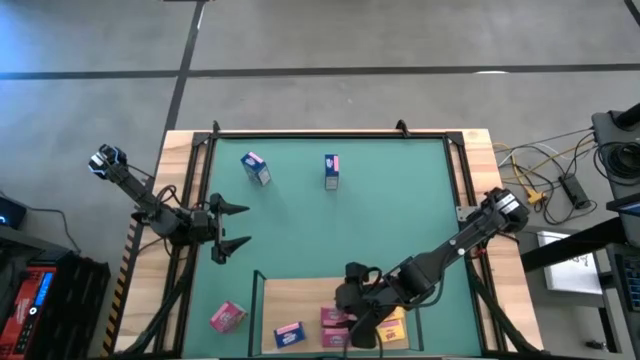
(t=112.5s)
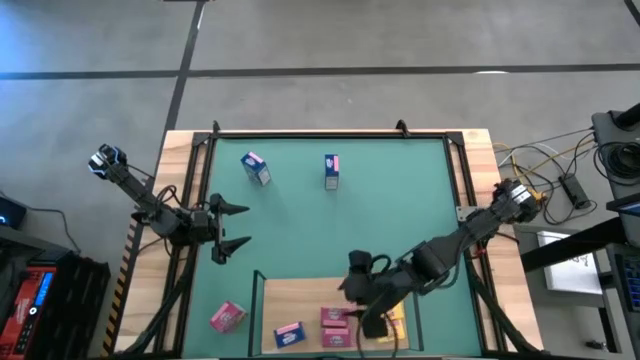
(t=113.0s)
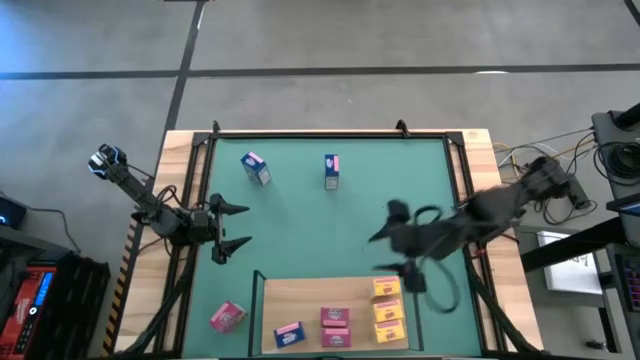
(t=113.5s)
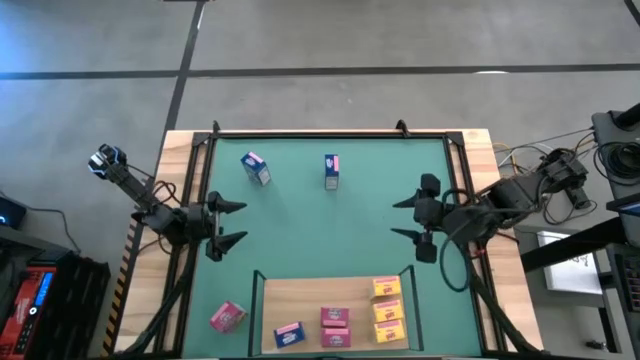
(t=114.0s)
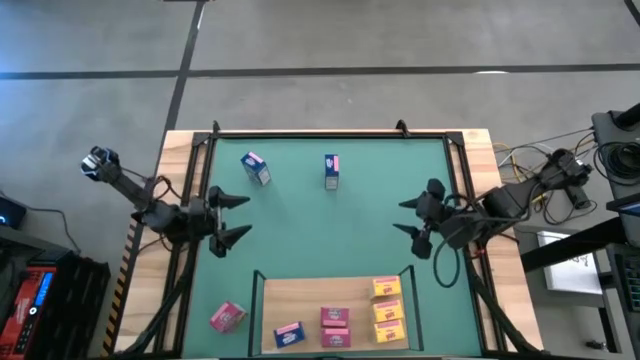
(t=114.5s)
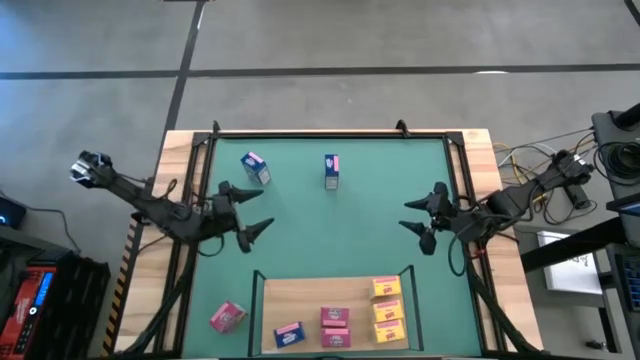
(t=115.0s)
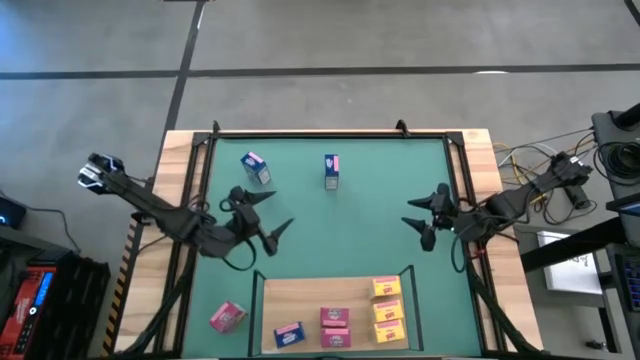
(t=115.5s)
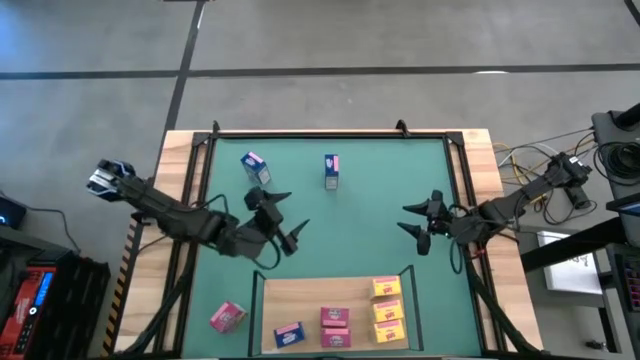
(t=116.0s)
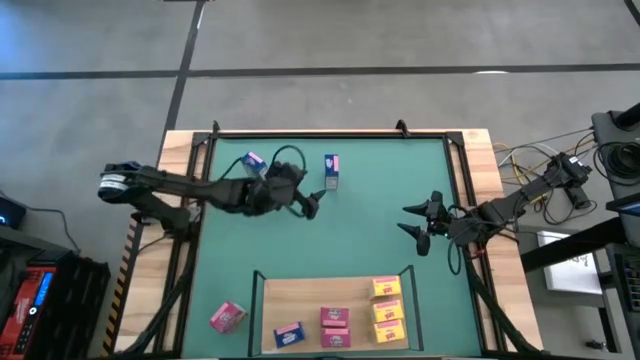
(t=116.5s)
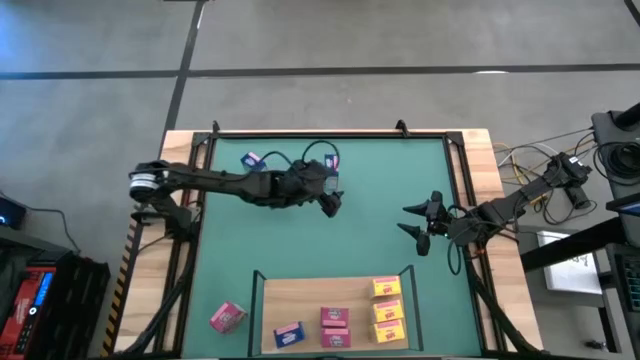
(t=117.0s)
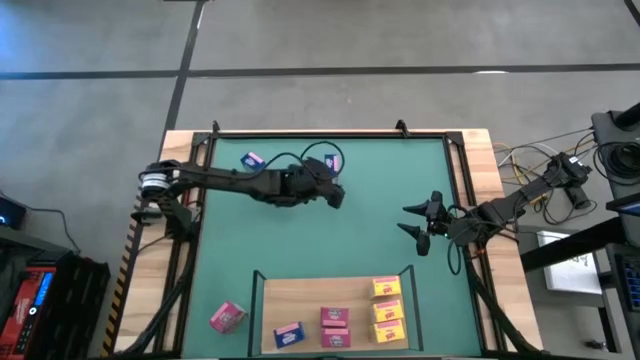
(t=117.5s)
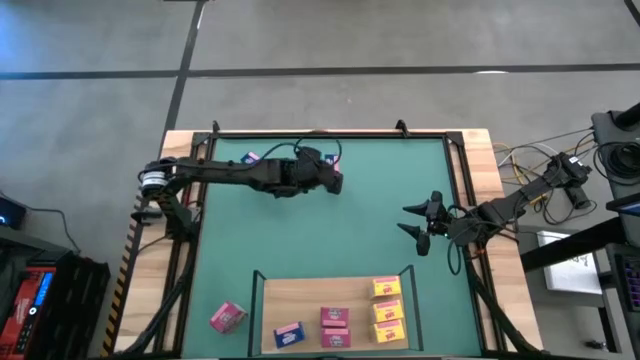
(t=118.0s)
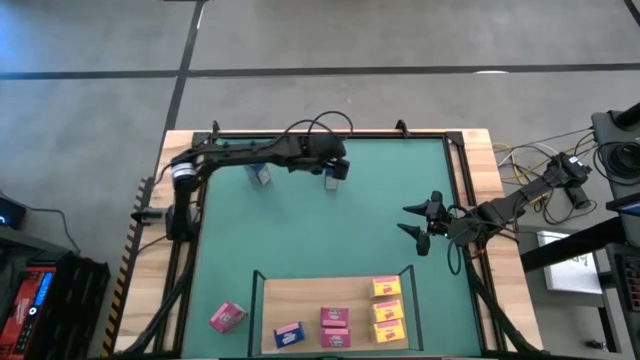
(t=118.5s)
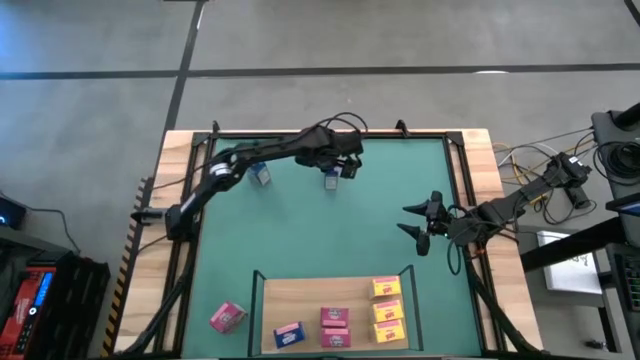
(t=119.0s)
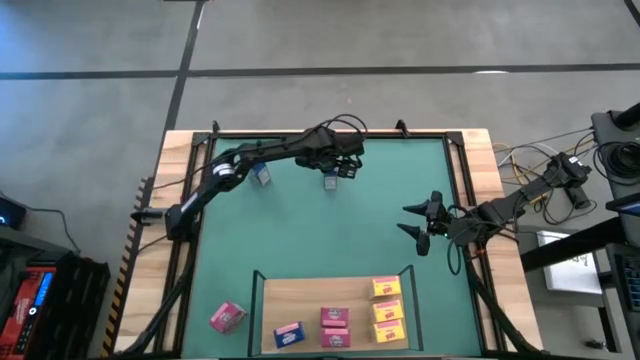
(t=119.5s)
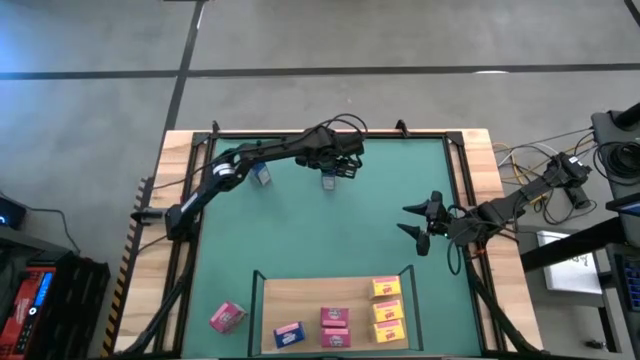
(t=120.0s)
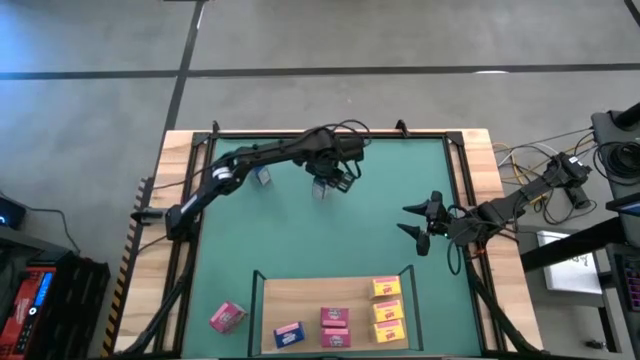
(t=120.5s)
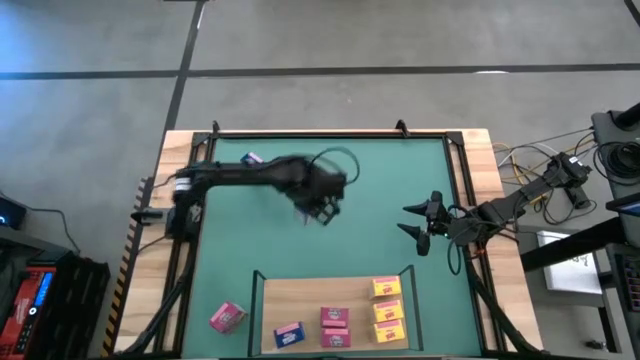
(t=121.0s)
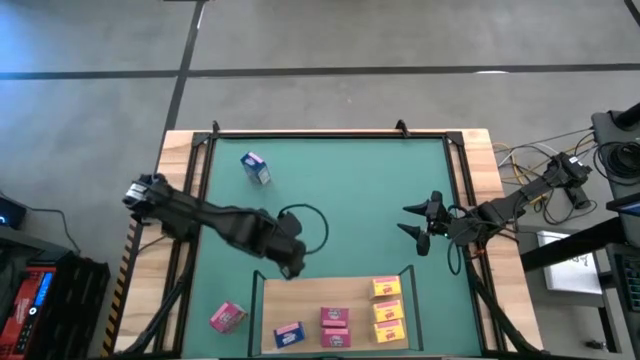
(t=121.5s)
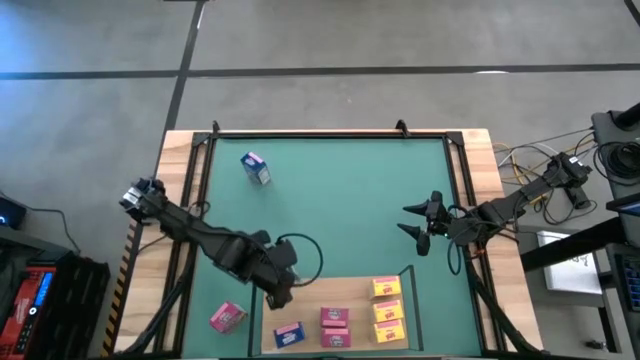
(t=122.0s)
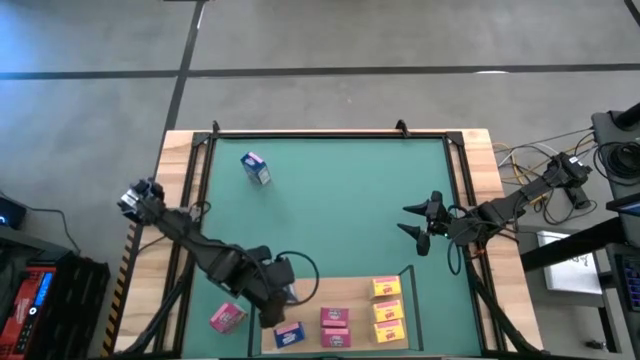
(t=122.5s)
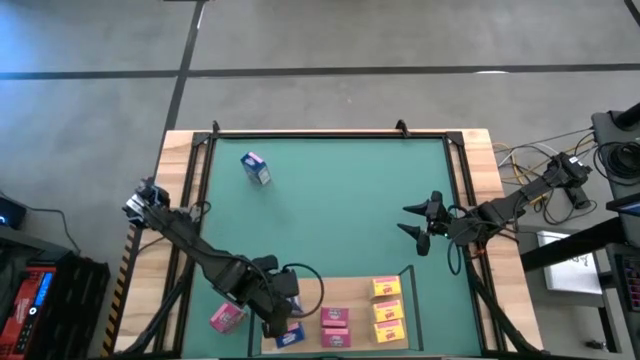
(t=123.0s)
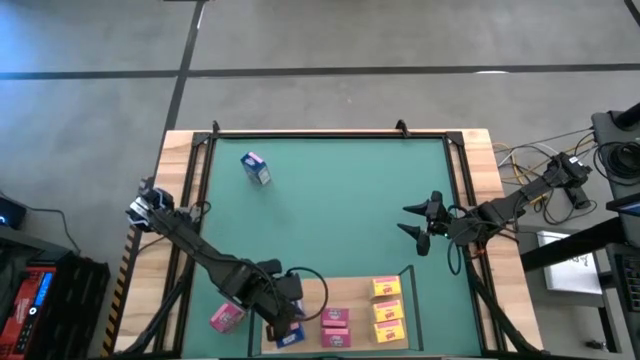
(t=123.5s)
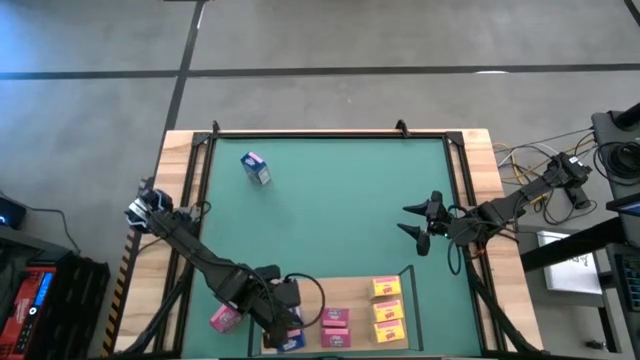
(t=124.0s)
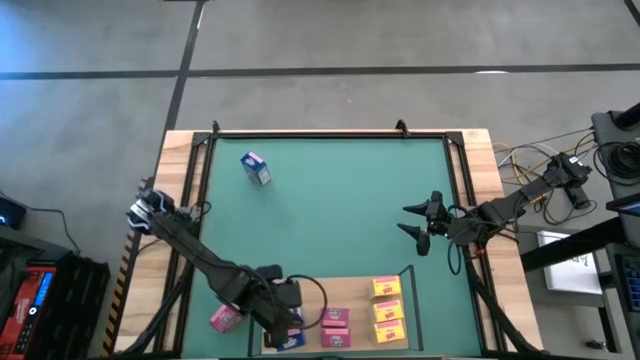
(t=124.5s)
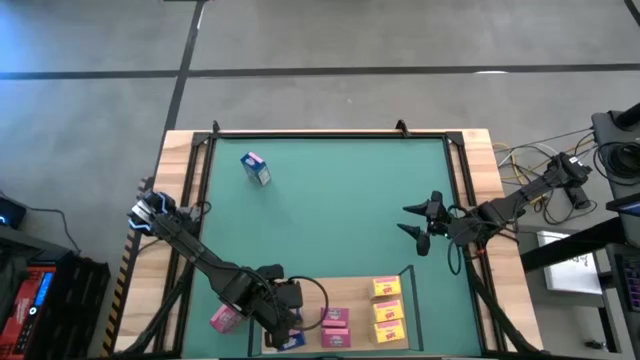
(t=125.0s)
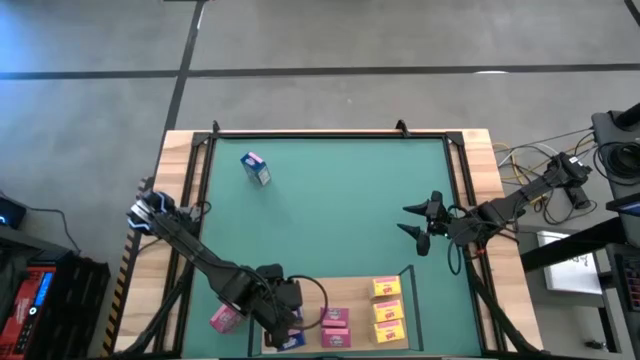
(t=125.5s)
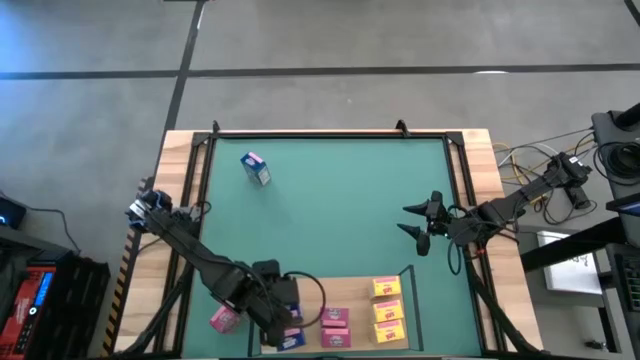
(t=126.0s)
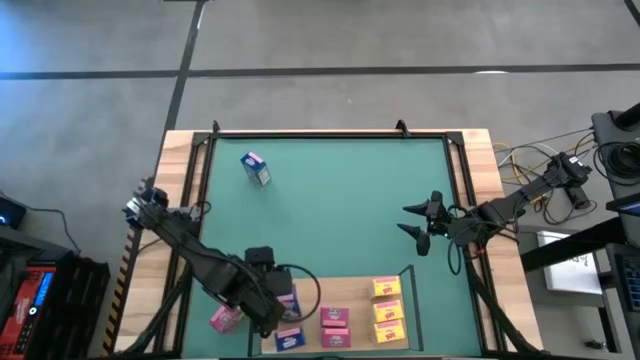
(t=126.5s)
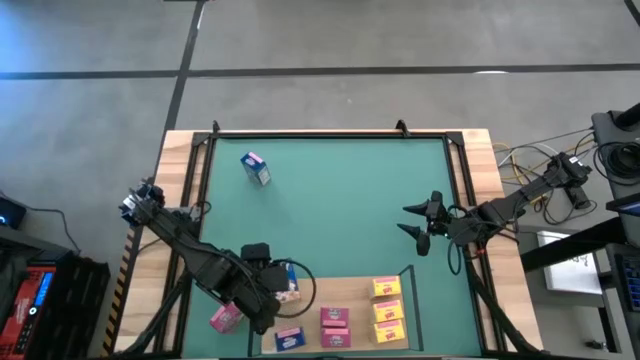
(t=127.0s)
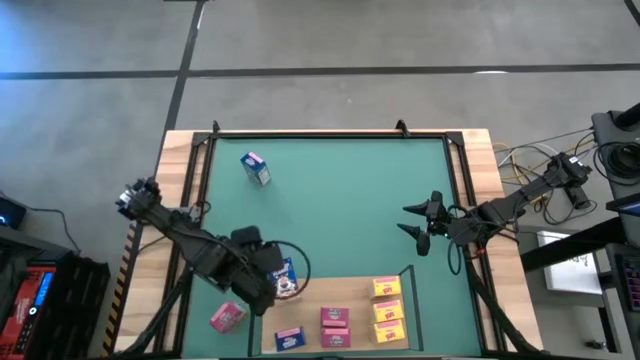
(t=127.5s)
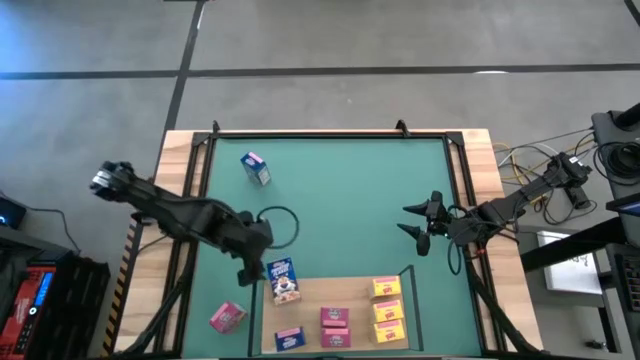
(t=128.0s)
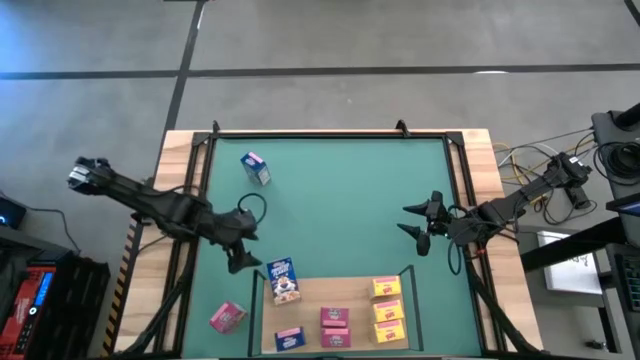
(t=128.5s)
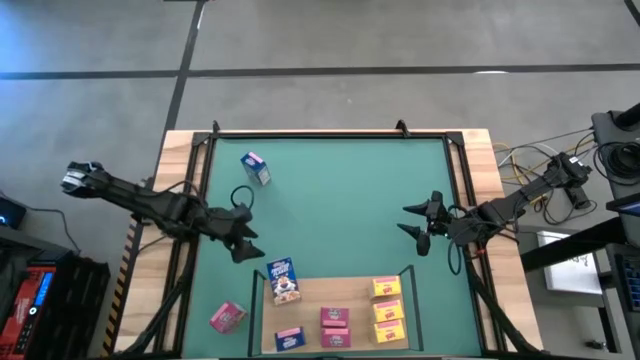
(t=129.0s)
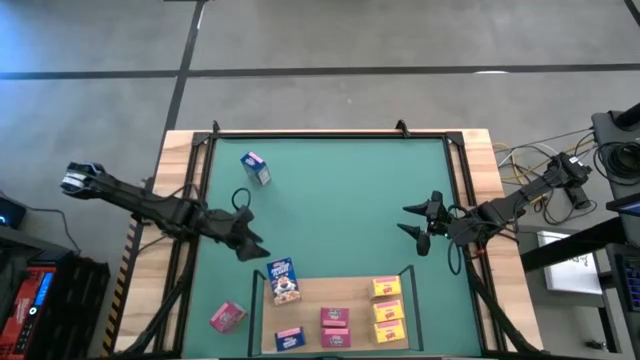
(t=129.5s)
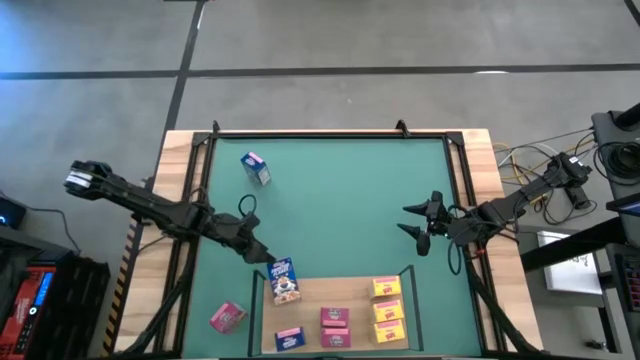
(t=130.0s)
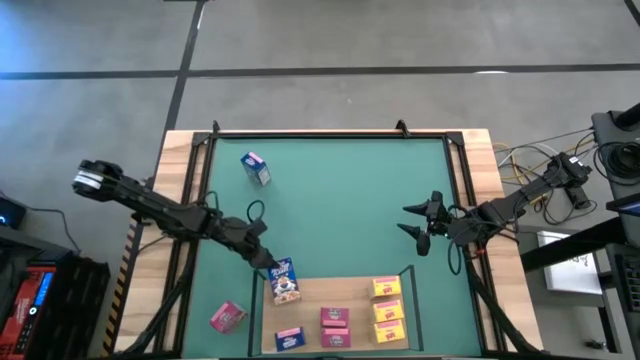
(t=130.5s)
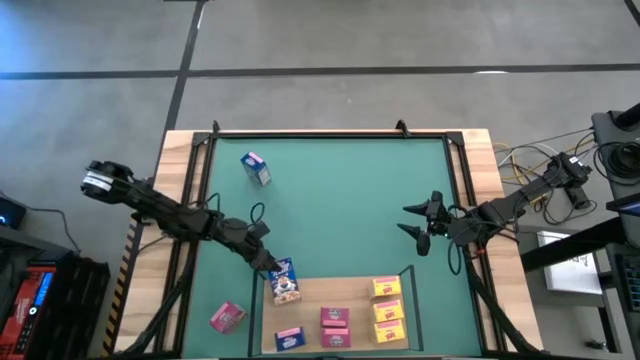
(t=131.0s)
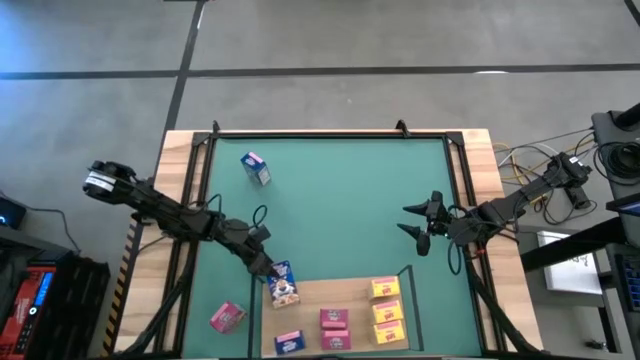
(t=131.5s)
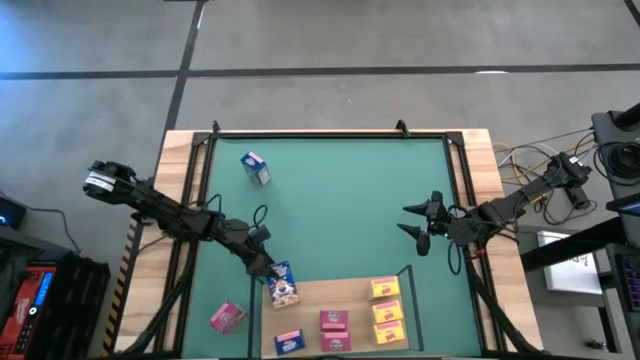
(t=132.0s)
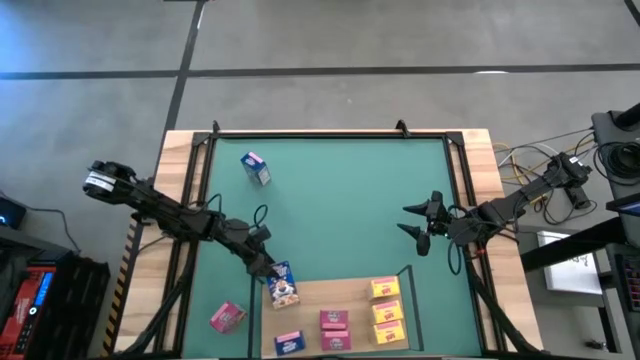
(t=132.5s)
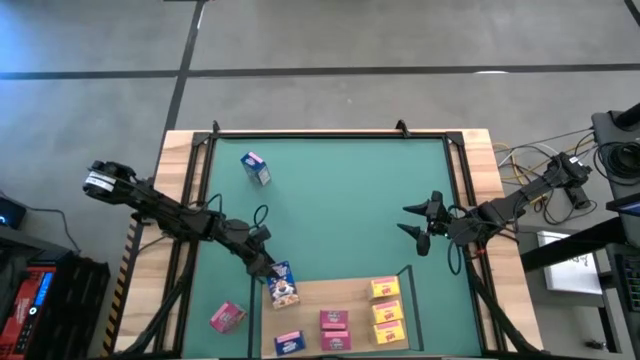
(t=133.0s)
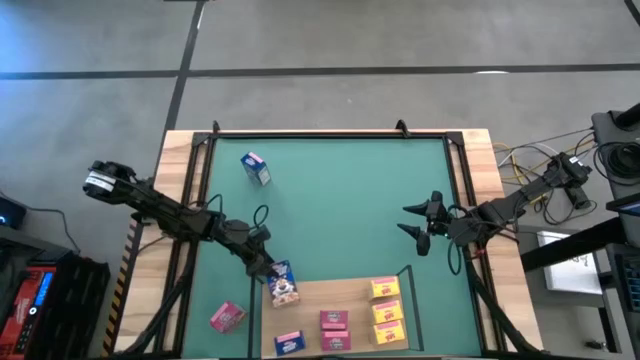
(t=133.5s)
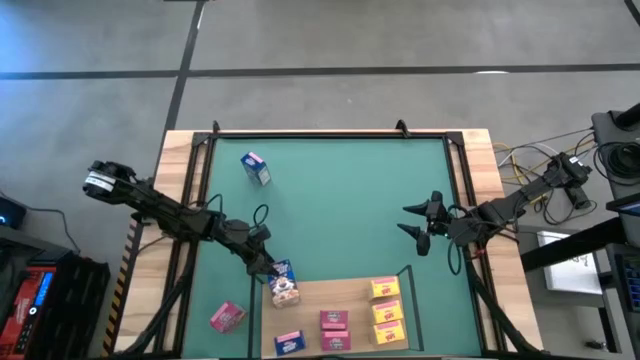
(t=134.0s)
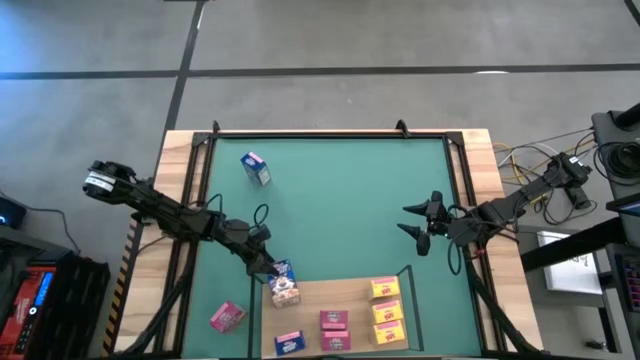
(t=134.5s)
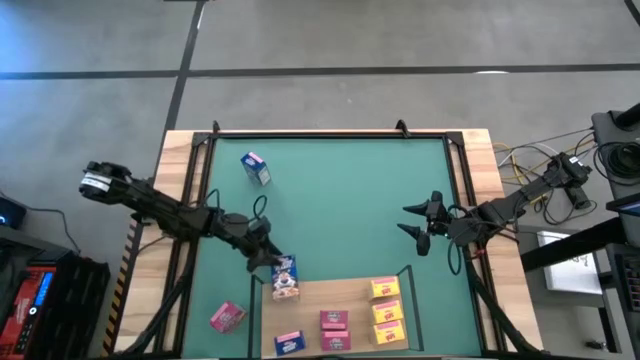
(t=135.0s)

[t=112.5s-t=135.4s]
Task: Stack cereal on shelf
Put the right blue cereal box on the shelf aligned with the other blue cereal box
